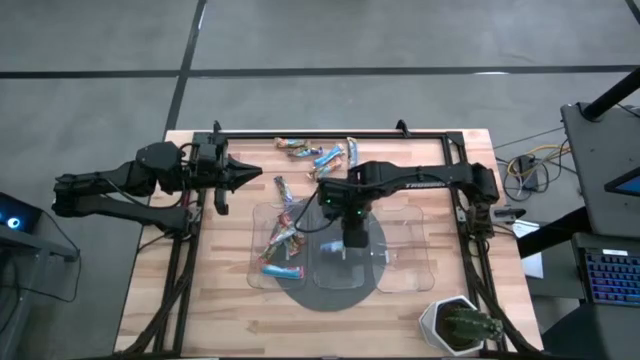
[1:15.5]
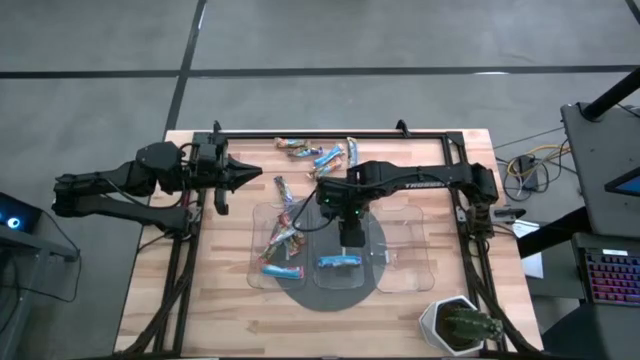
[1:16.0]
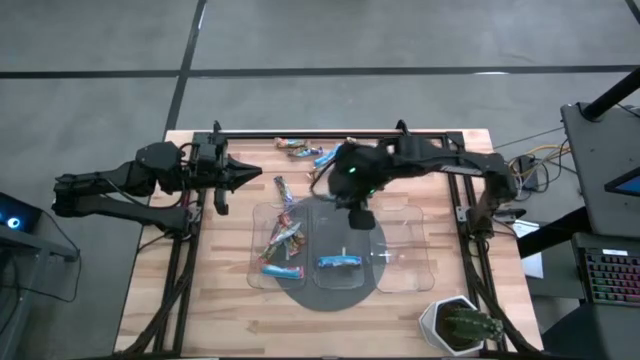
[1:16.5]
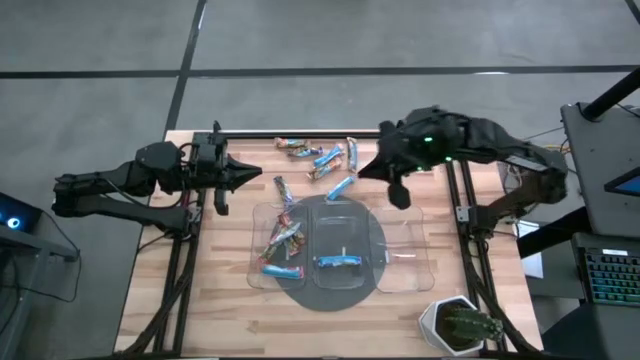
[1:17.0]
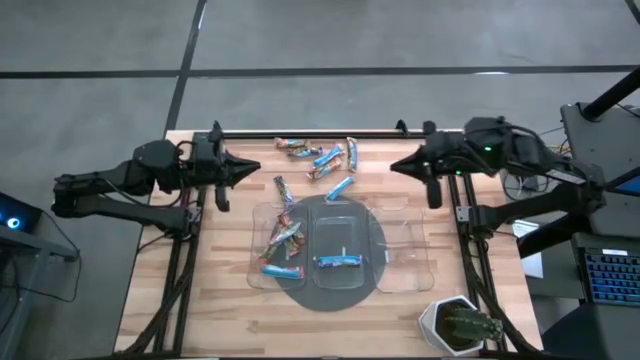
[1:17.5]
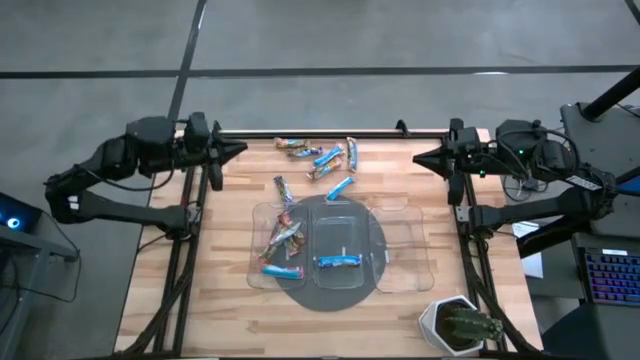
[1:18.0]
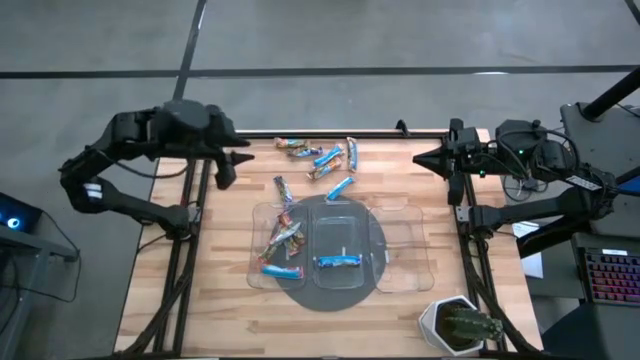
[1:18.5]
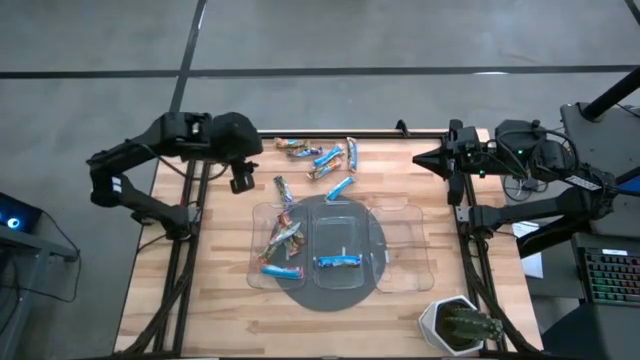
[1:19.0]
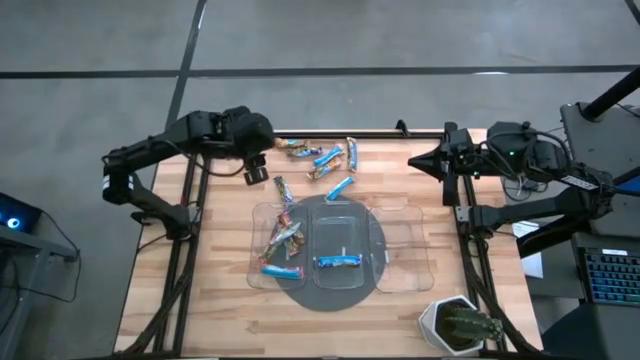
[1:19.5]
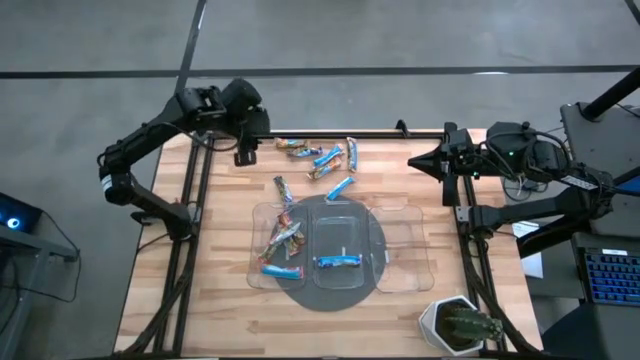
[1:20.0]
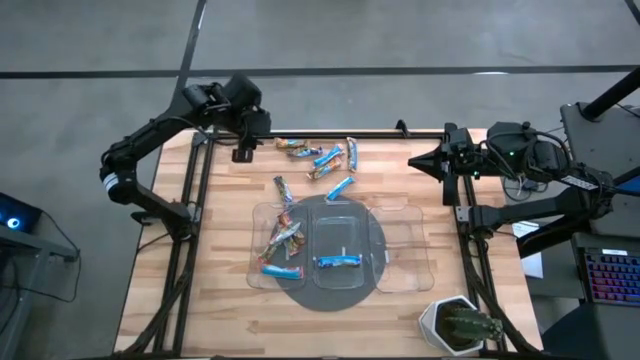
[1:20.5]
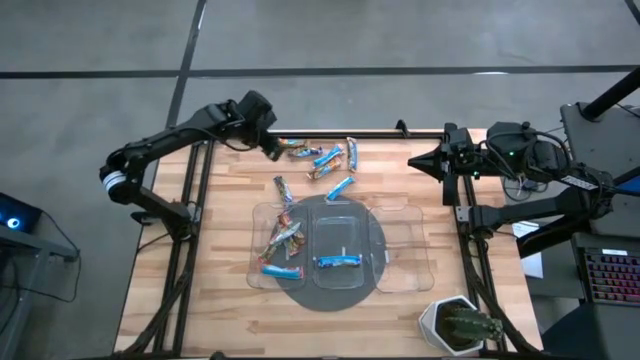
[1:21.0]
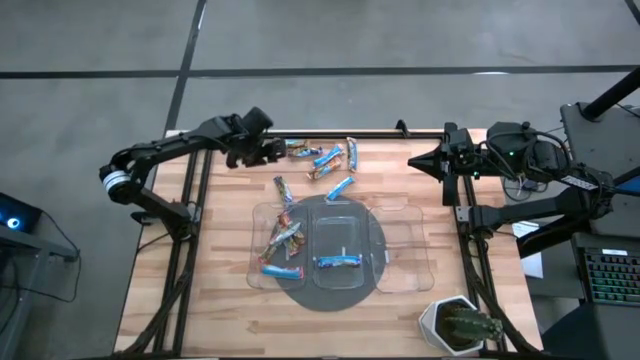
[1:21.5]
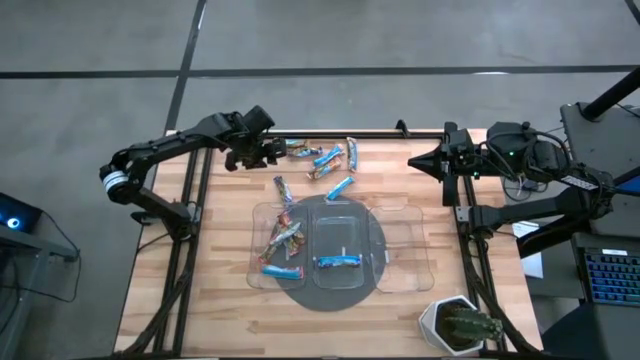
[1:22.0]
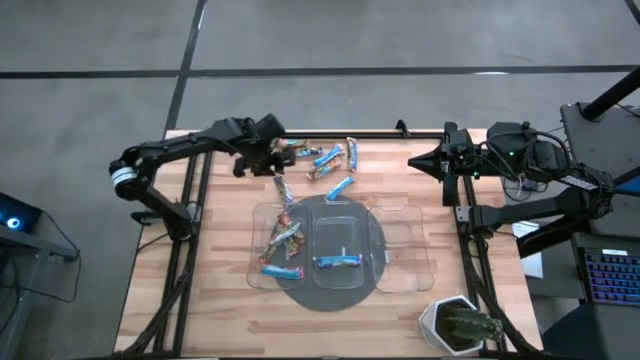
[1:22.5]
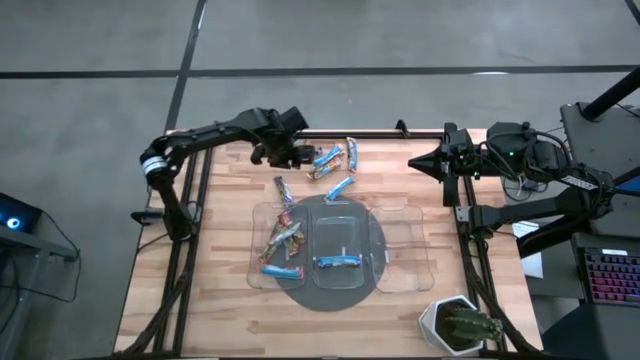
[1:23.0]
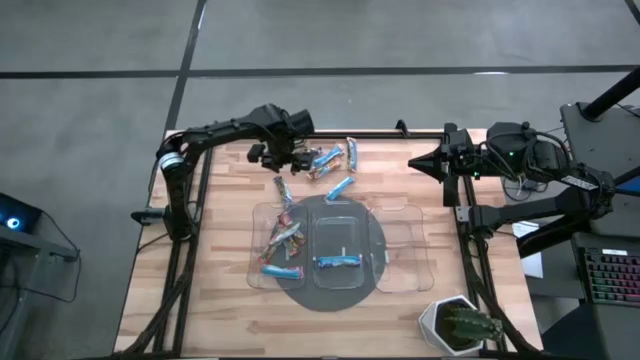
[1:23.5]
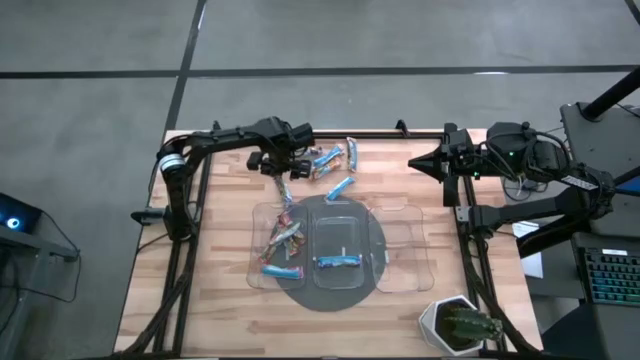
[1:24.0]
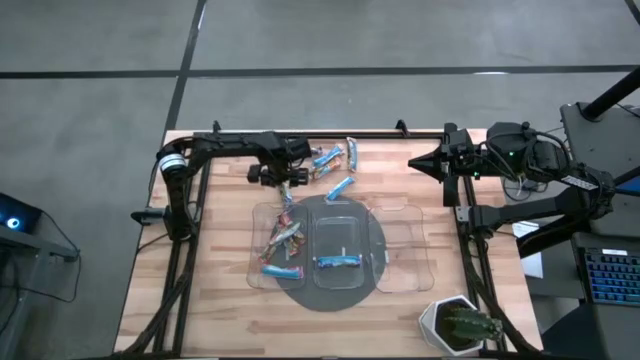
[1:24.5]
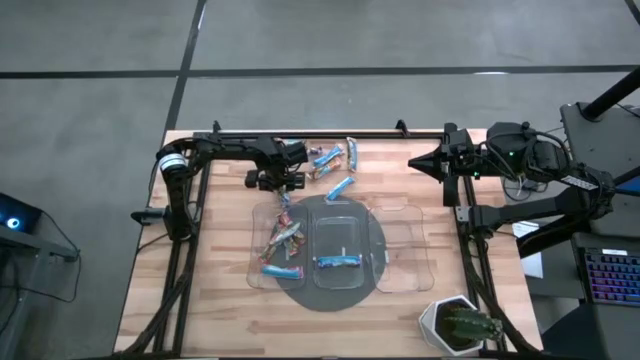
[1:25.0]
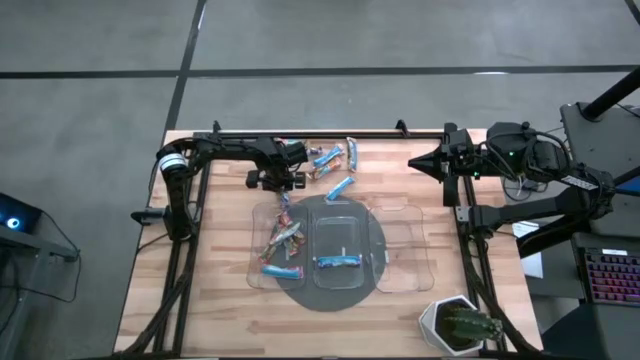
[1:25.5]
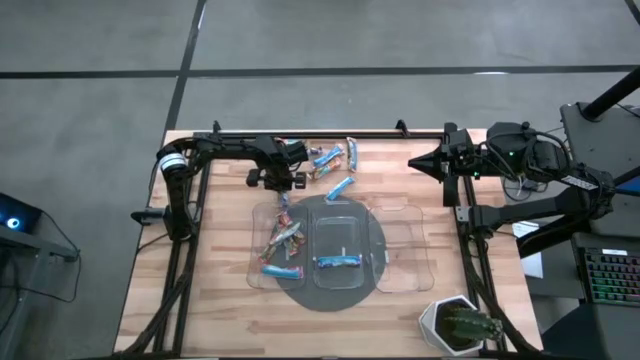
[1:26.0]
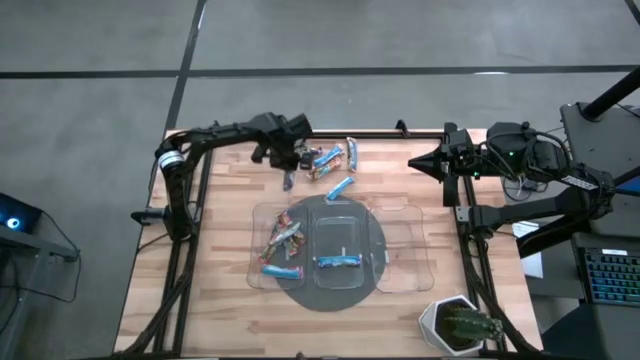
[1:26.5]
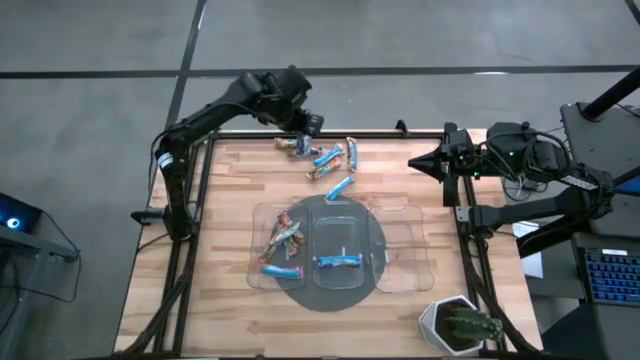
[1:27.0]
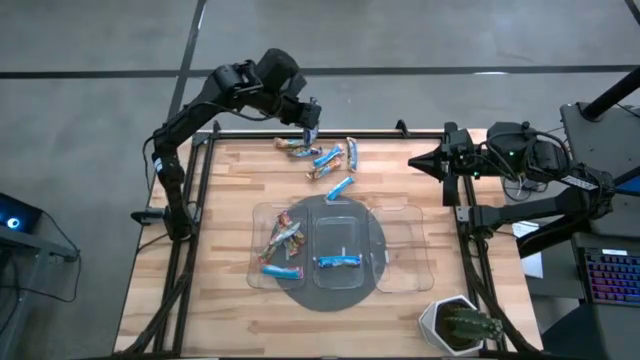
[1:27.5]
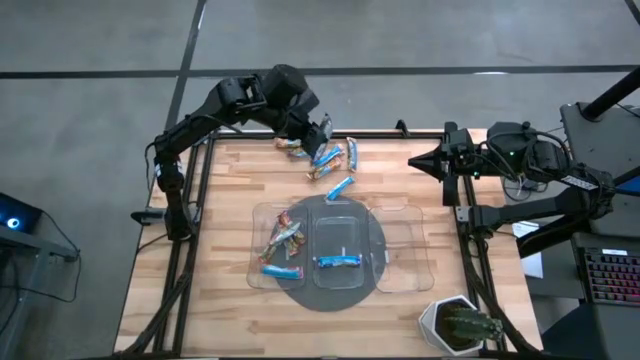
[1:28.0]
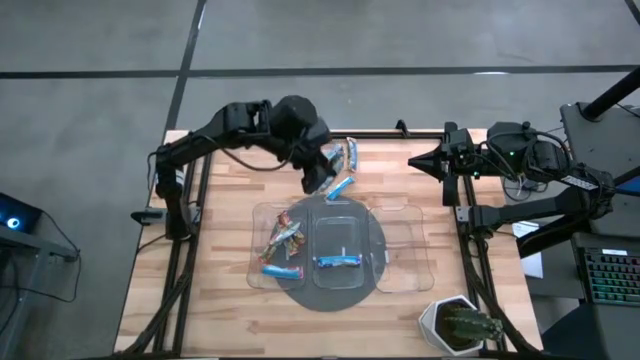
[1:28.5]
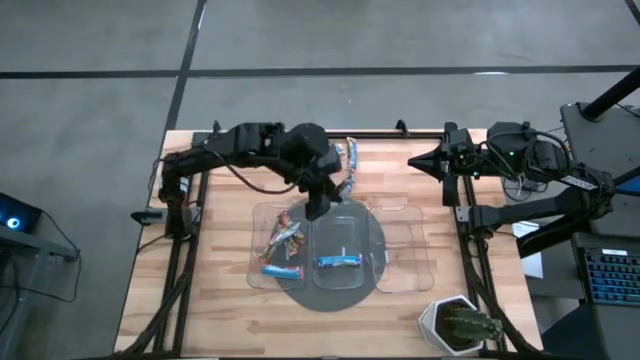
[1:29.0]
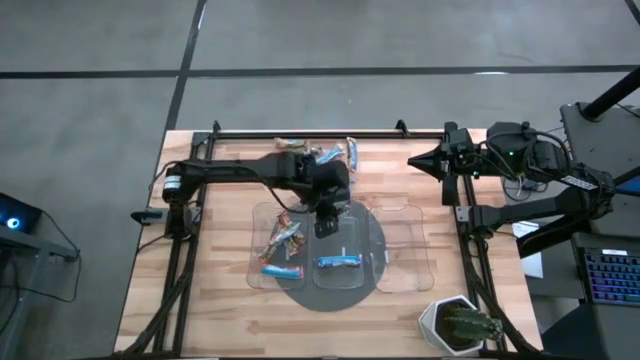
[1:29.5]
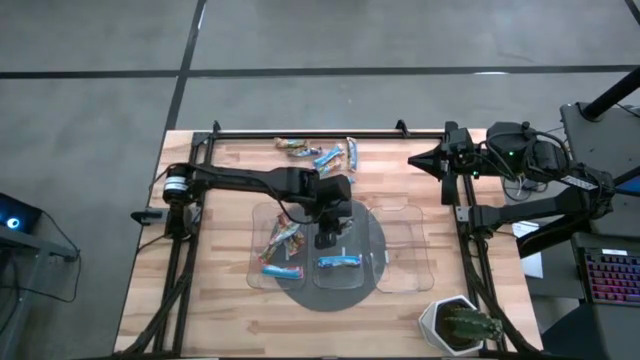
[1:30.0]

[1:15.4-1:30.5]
Task: Pick and place Granola Bars by type
Put the blue granola bar into the middle transparent bin
